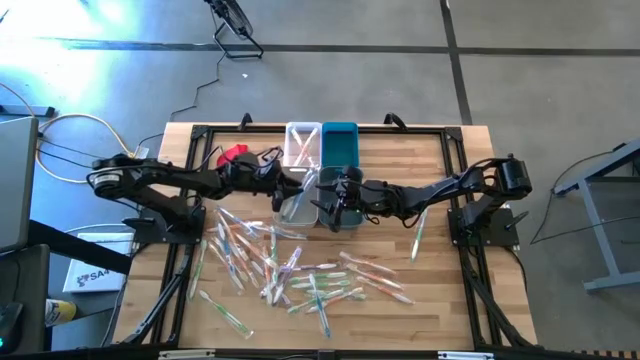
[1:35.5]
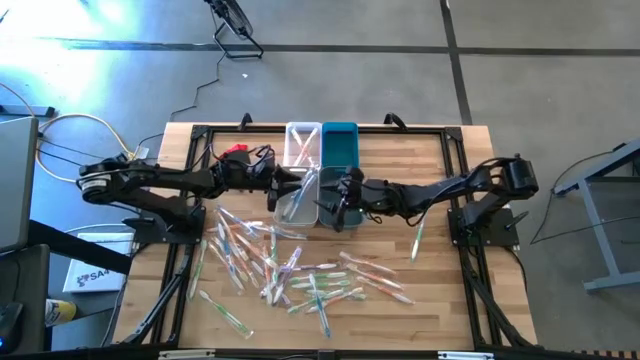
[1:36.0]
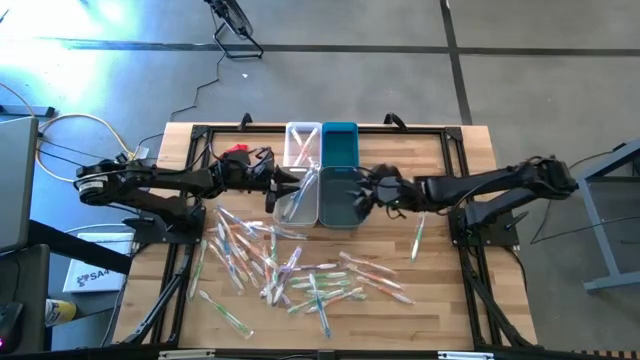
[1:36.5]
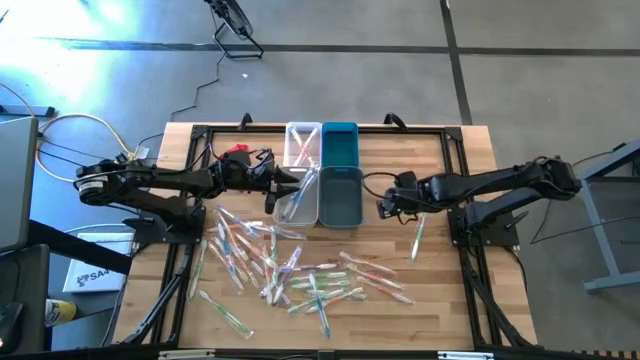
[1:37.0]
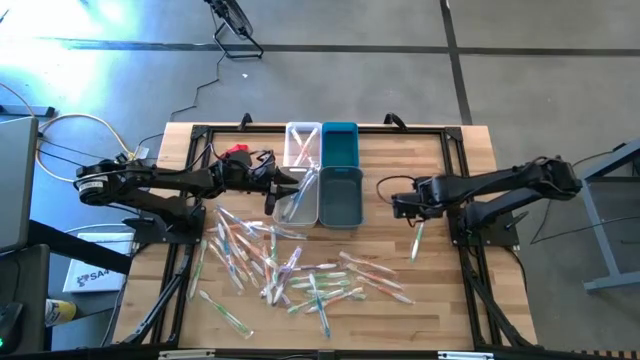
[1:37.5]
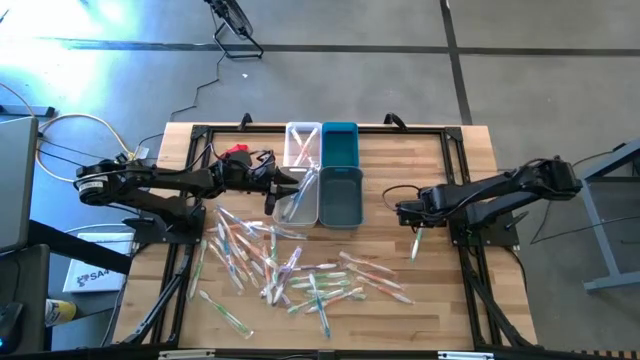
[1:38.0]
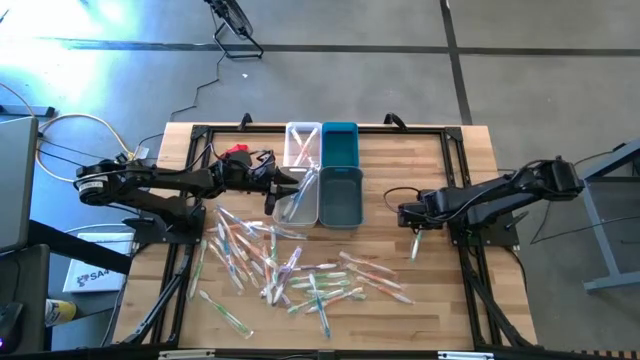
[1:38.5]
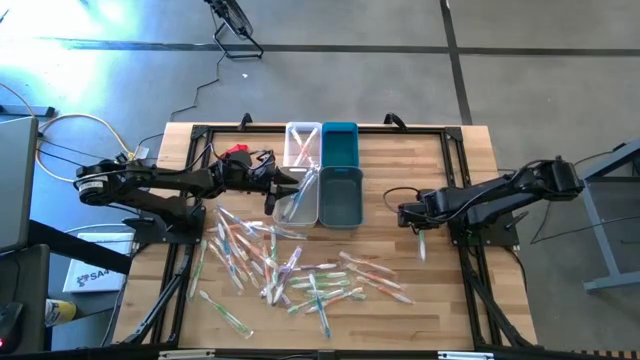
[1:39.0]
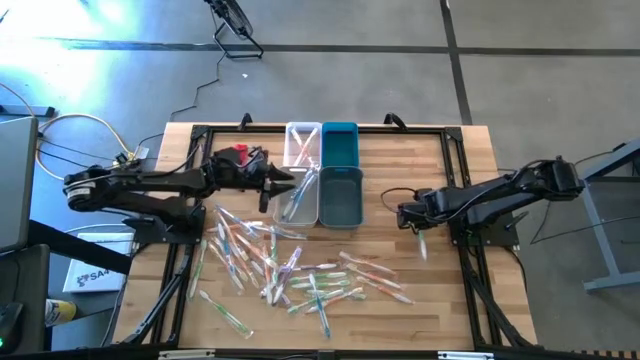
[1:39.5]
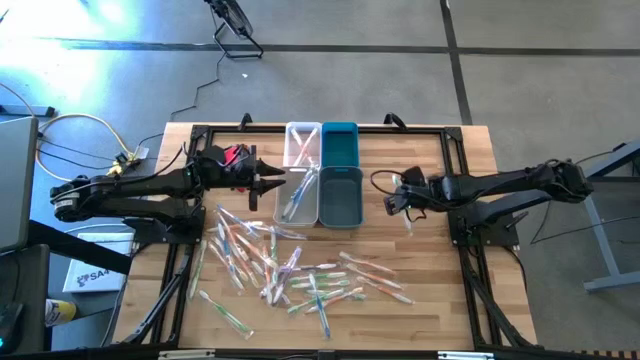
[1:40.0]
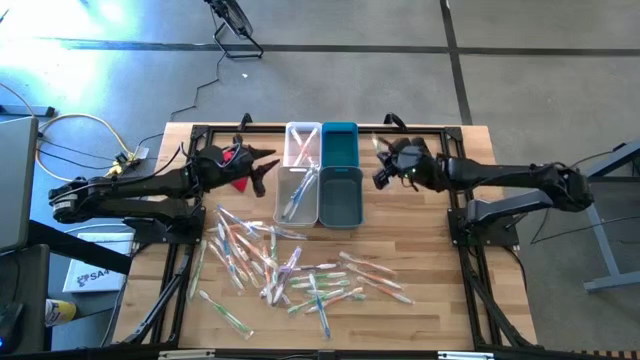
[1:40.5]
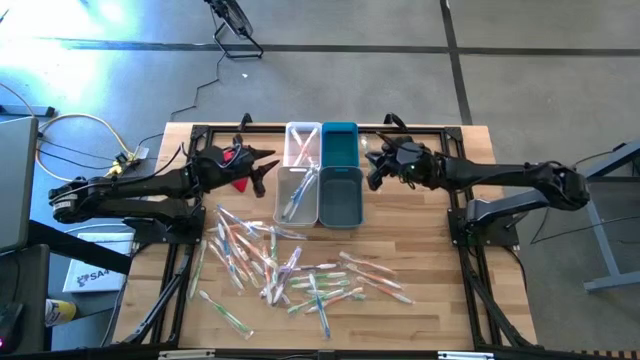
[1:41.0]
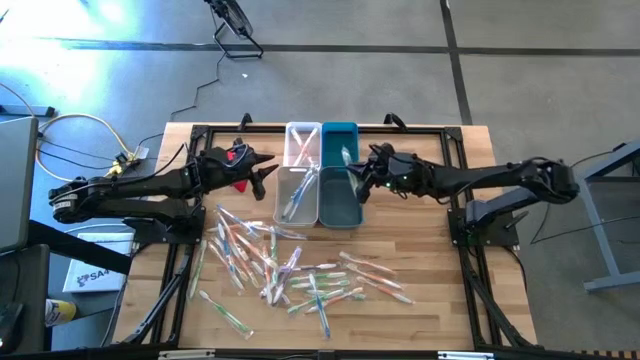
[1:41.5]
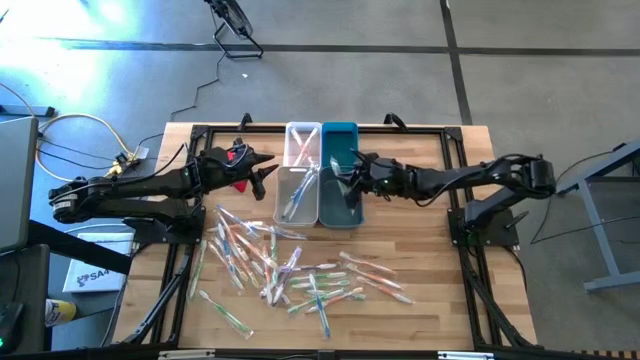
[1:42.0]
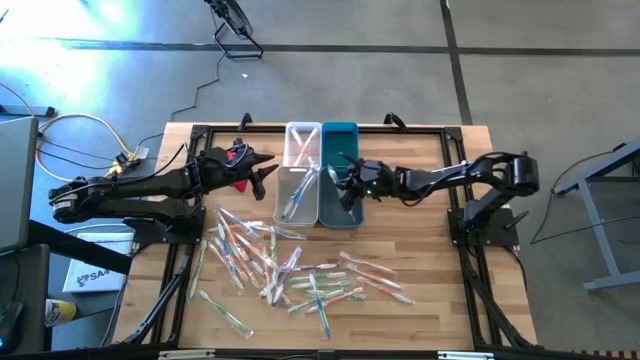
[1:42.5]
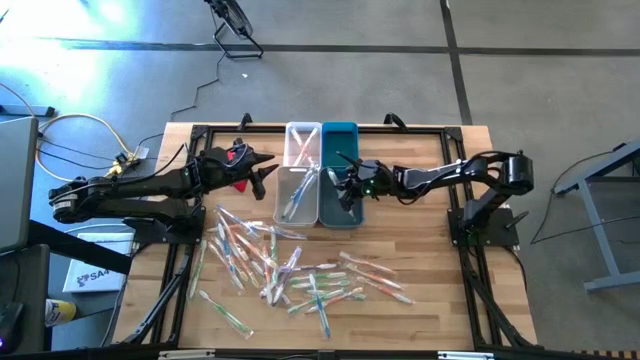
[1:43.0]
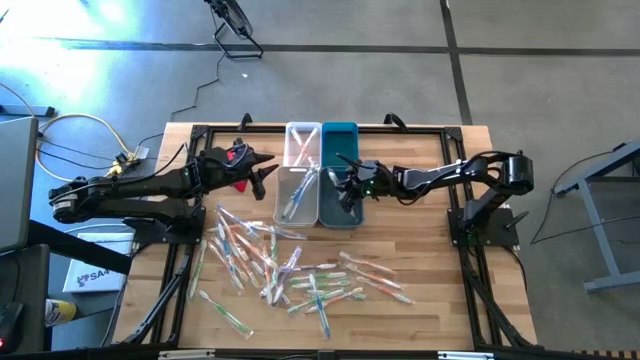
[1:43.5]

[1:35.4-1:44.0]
Task: Pick & Place Toothbrushes
Put the green toothbrush into the blue bin

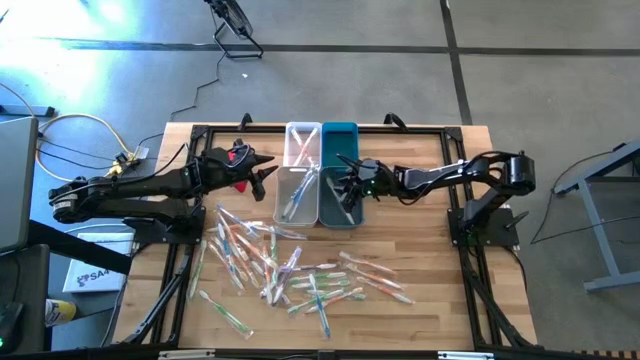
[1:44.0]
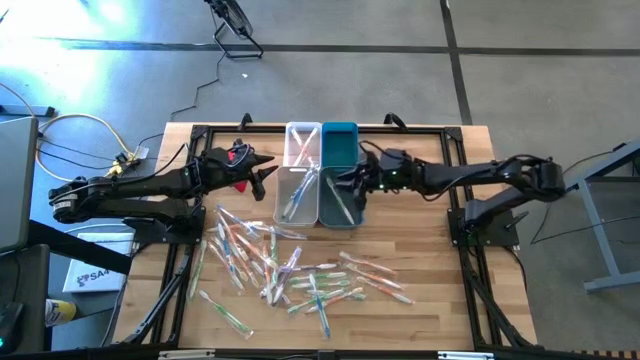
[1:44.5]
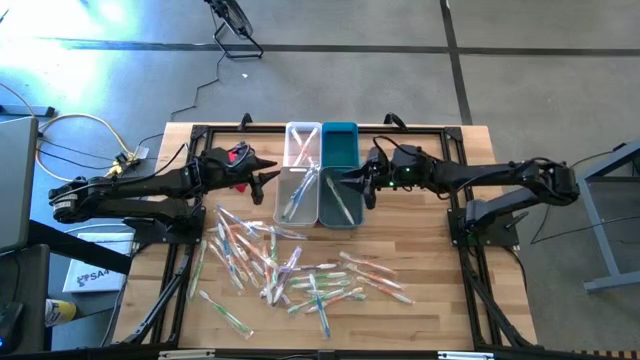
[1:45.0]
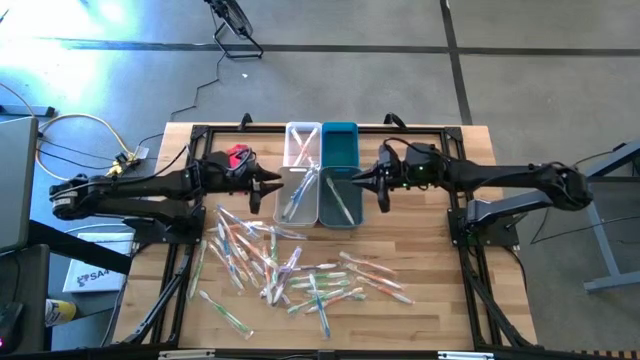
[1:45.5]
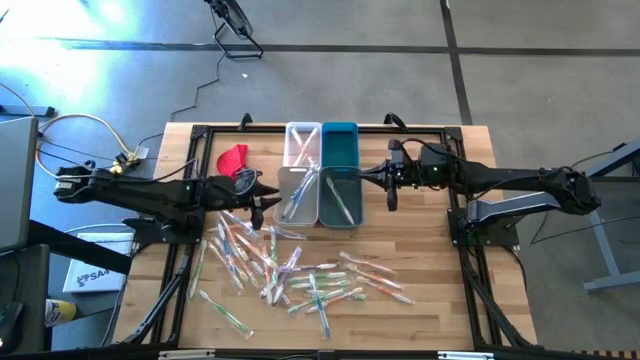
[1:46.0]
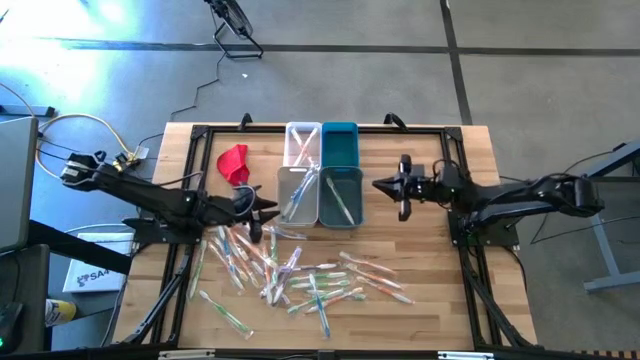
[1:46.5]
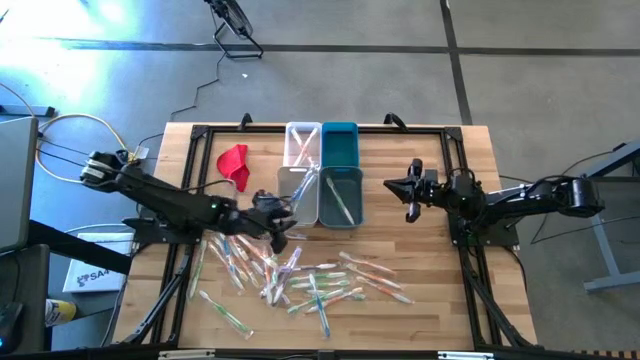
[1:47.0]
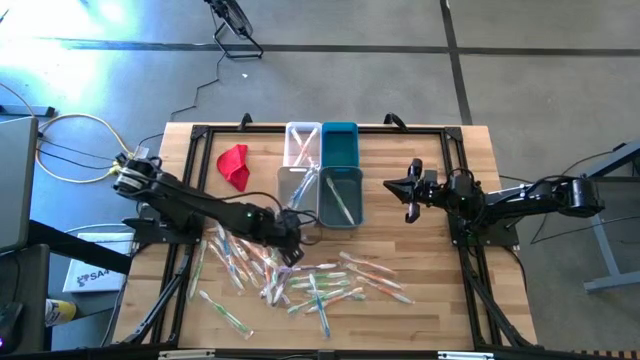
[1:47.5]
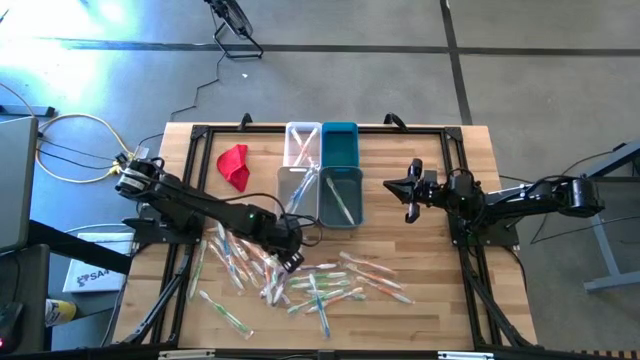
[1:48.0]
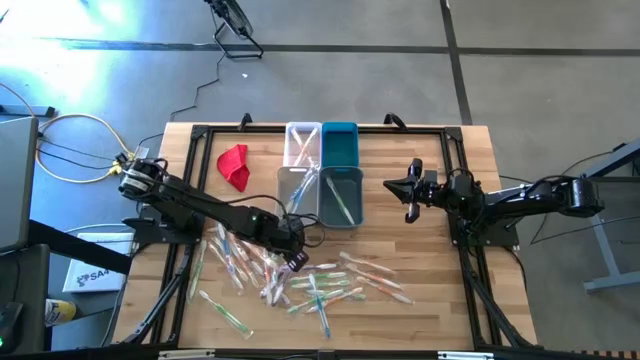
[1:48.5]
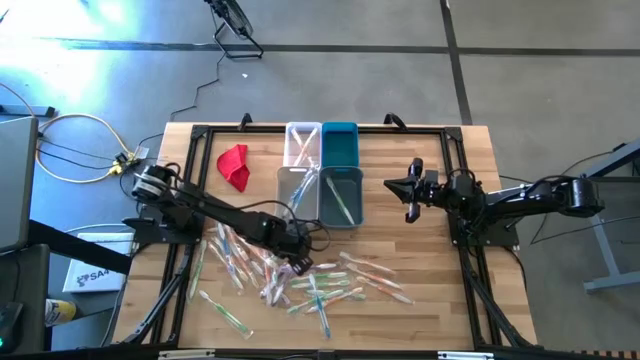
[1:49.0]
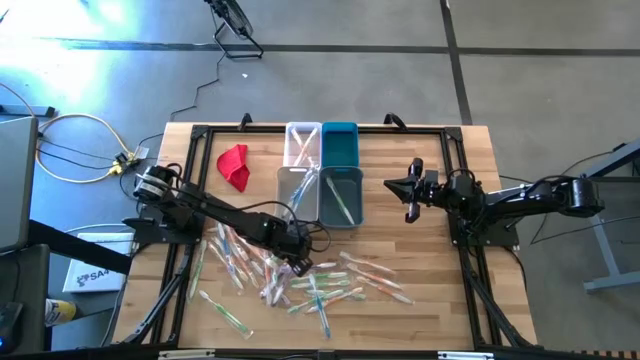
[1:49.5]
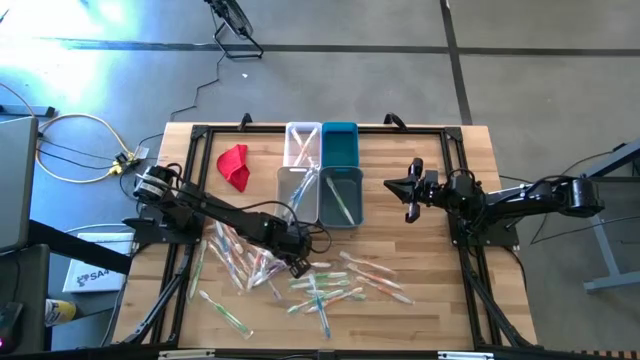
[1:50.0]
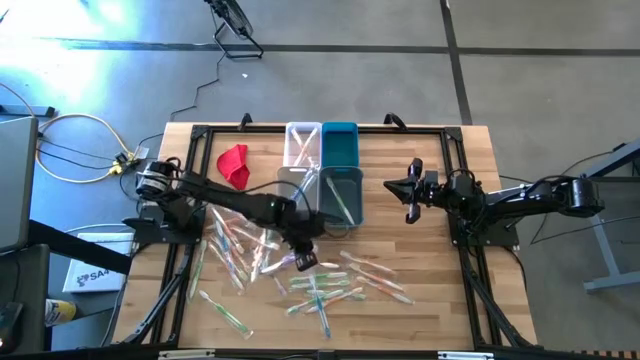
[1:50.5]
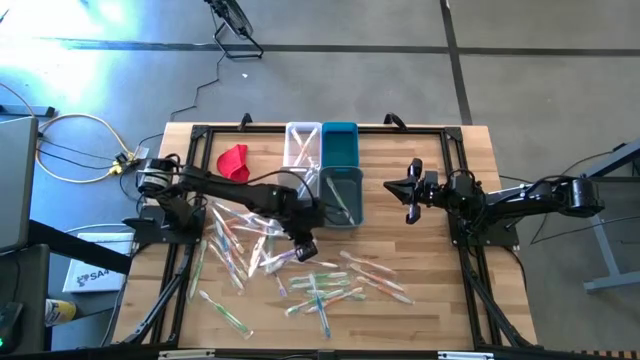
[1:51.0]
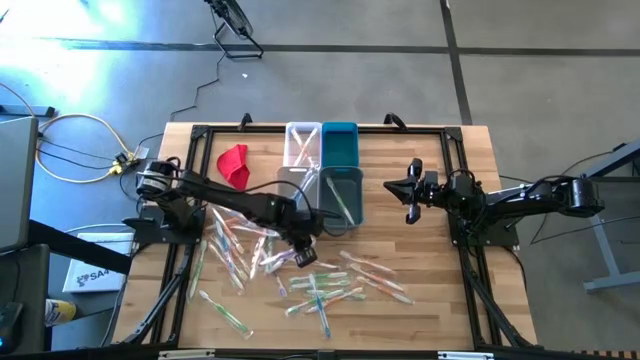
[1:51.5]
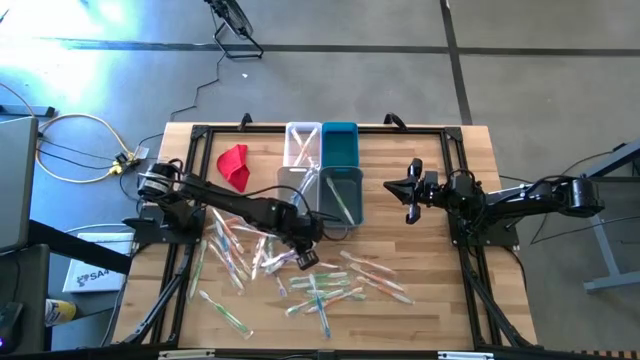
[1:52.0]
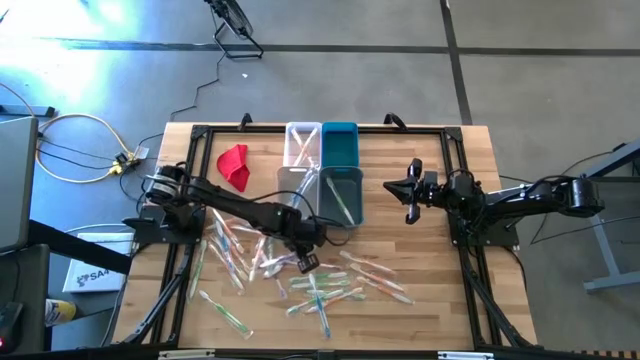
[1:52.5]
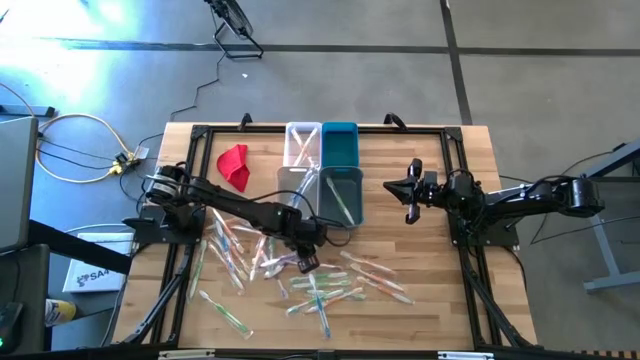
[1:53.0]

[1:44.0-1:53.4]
Put the violet toothbrush into the light blue bin

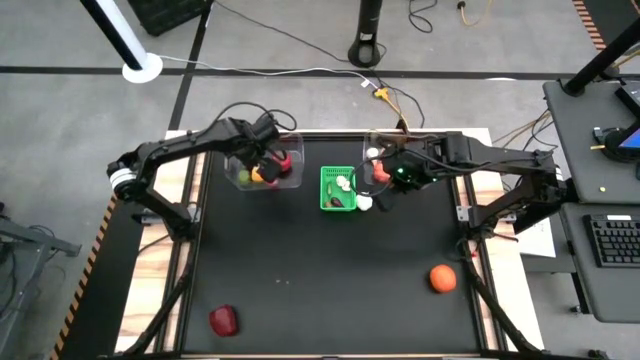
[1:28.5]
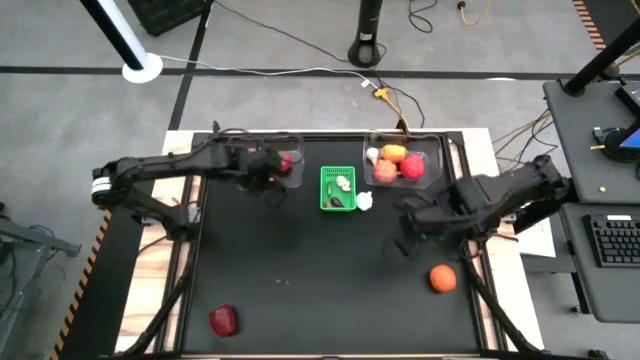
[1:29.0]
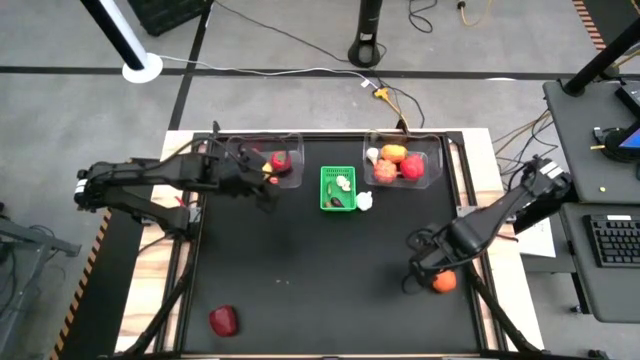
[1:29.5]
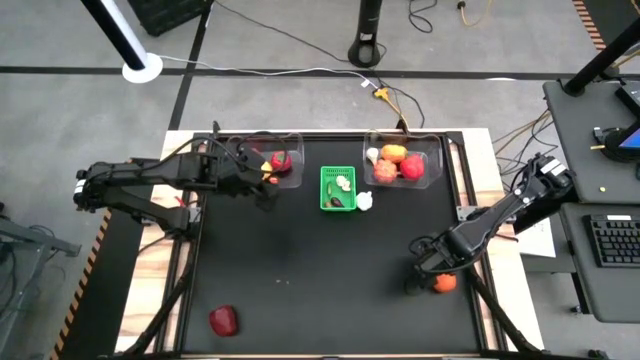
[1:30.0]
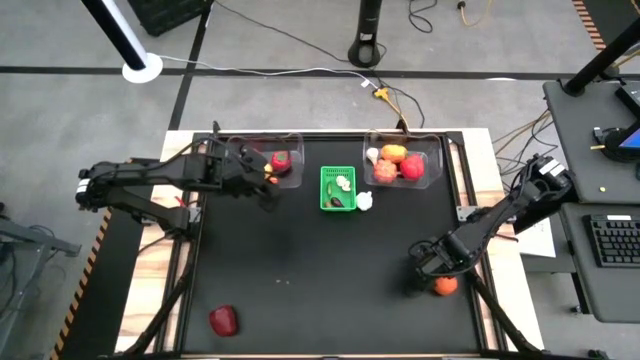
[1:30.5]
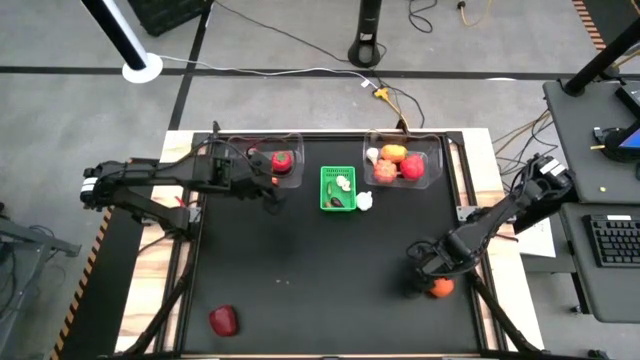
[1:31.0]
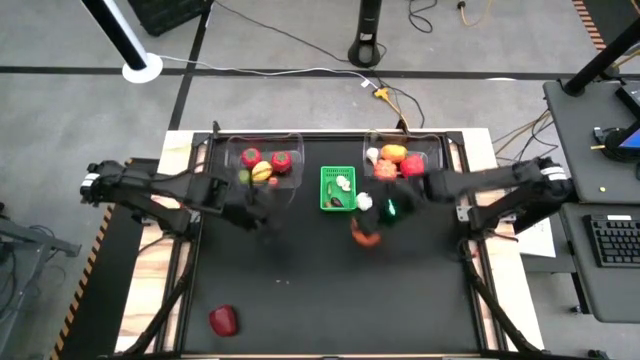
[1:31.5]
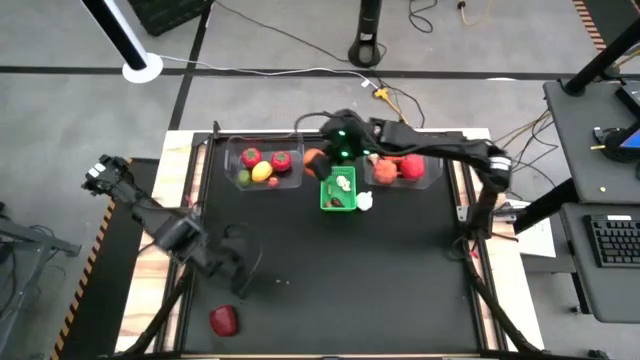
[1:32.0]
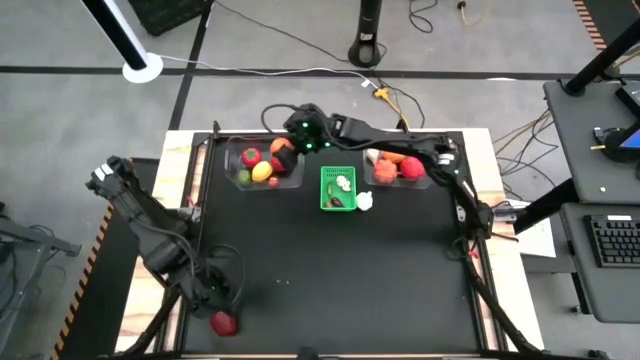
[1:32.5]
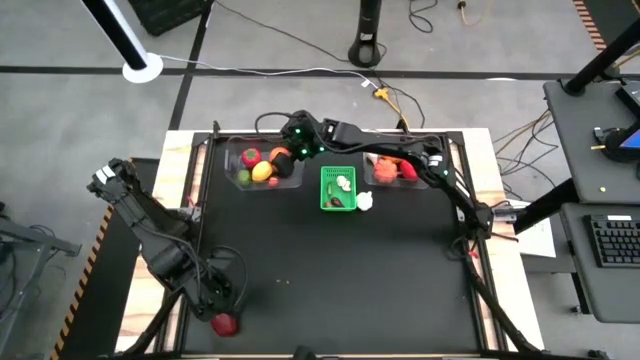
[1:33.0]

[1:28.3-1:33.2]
Task: Sort produce into baskets
Put the orange into the left transparent bin
